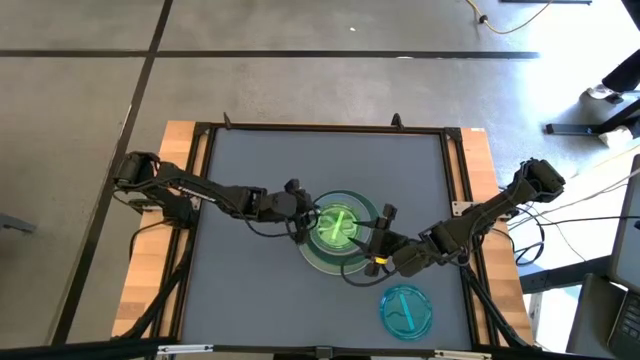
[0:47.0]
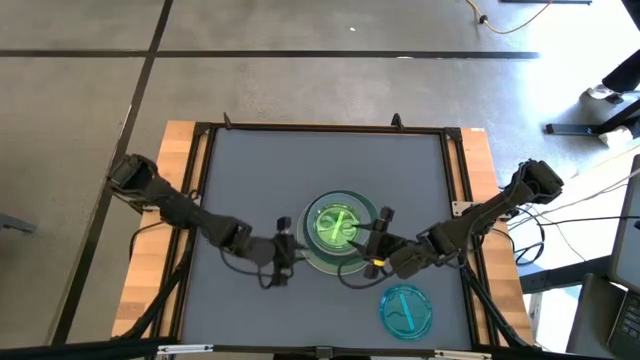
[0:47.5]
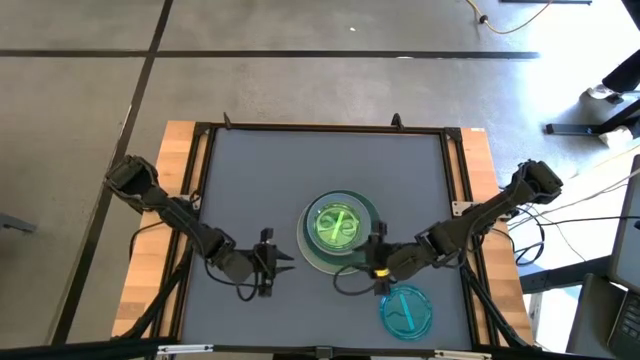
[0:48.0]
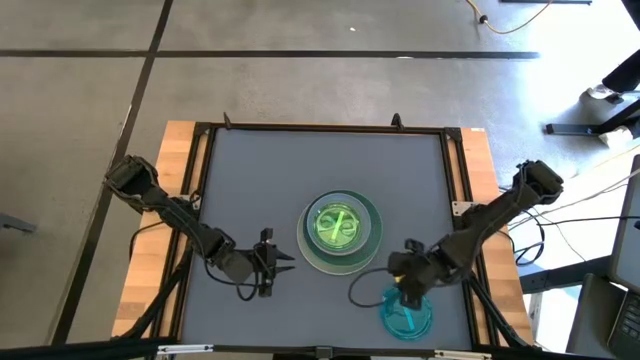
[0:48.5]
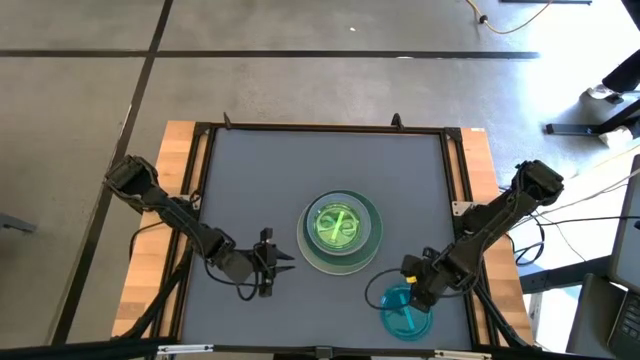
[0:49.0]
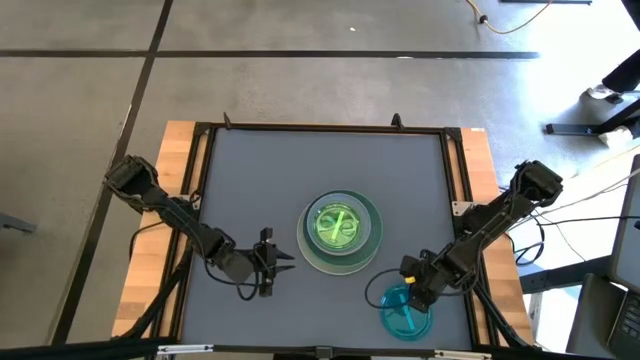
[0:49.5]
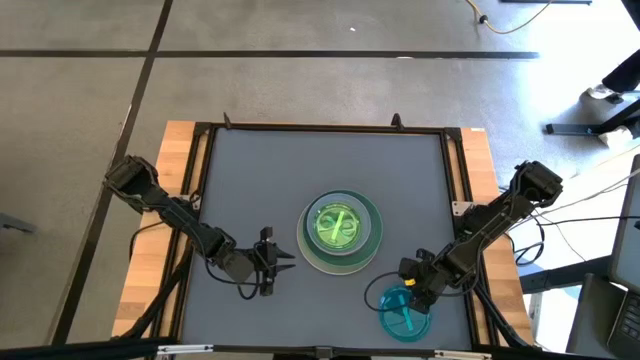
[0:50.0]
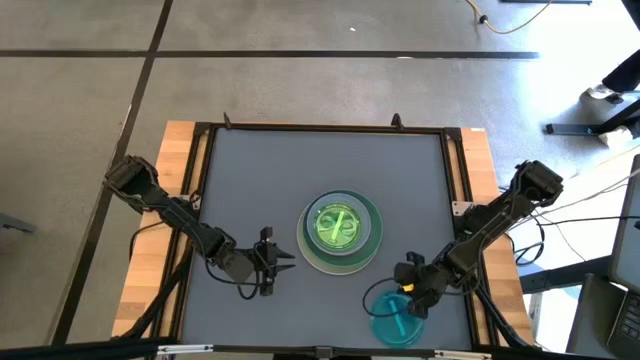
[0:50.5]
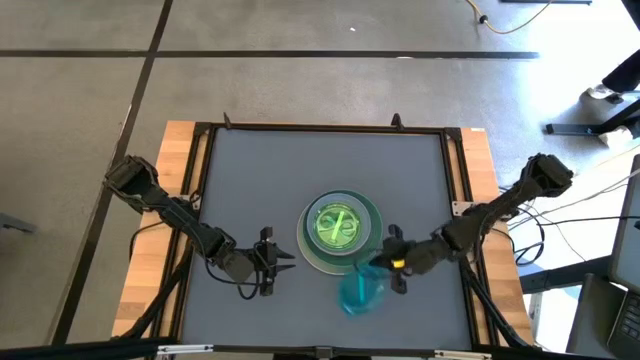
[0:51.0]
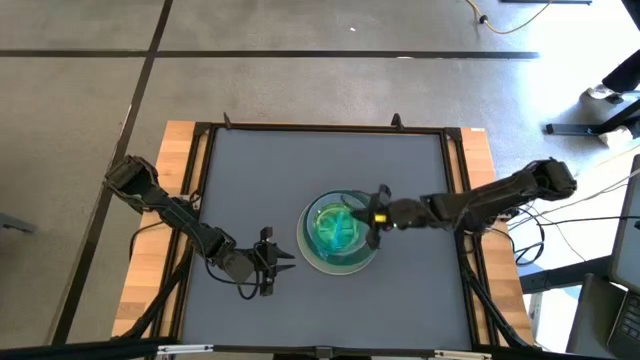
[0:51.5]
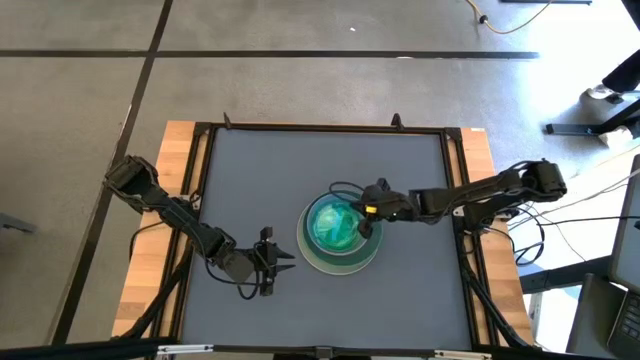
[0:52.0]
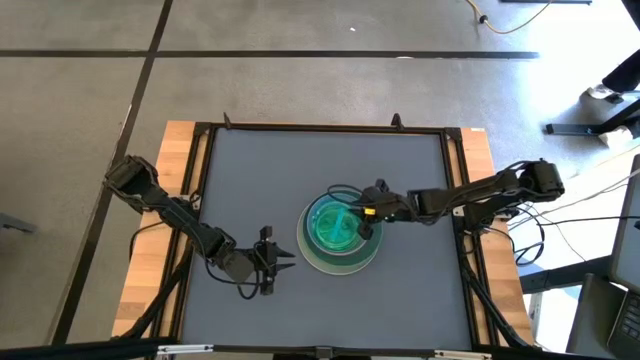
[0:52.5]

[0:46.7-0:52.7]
Task: Stack plastic plates
Stack the blue plate on the green plate

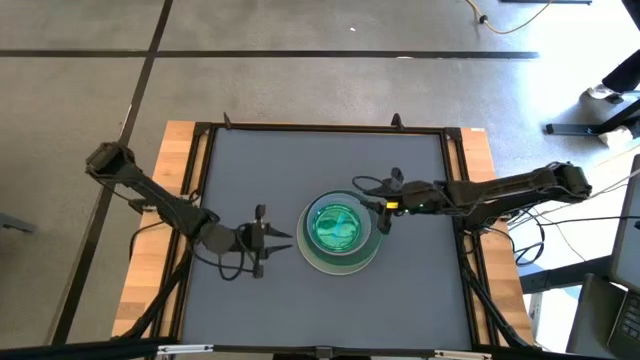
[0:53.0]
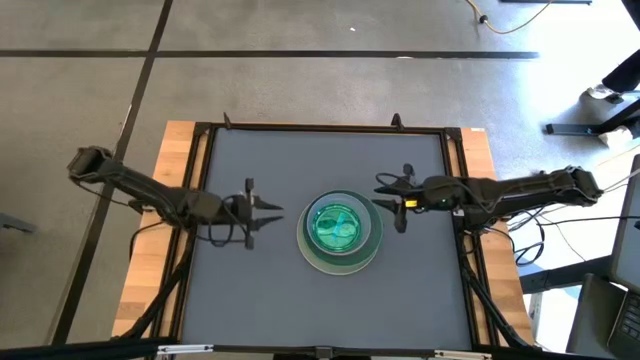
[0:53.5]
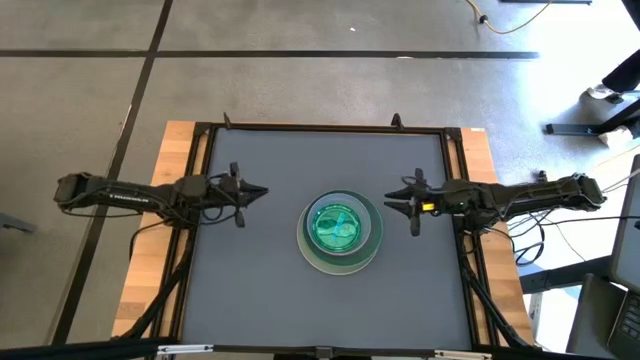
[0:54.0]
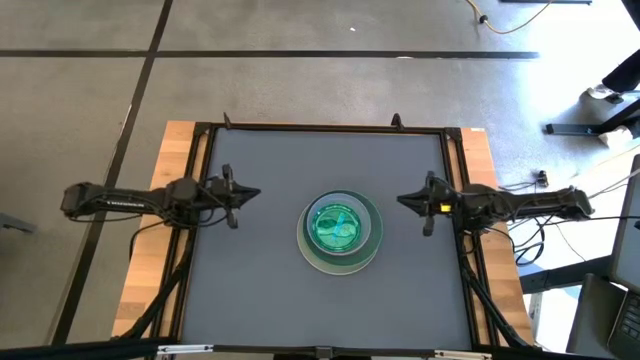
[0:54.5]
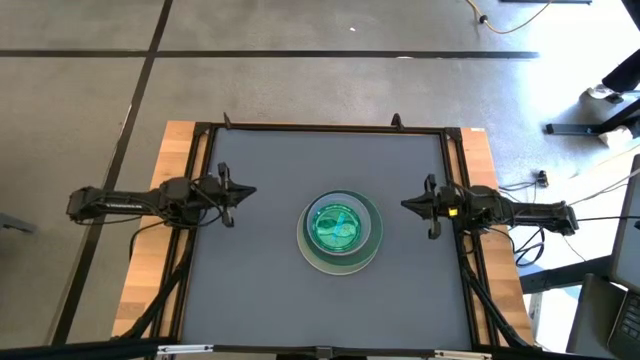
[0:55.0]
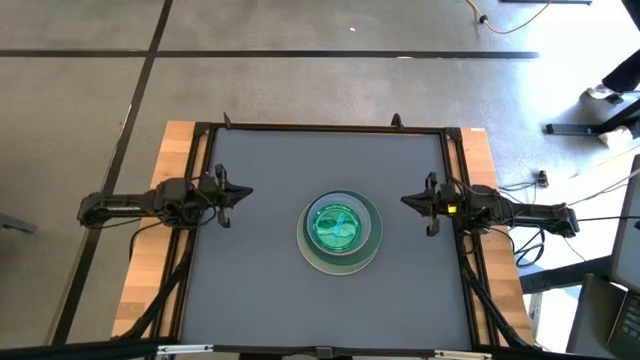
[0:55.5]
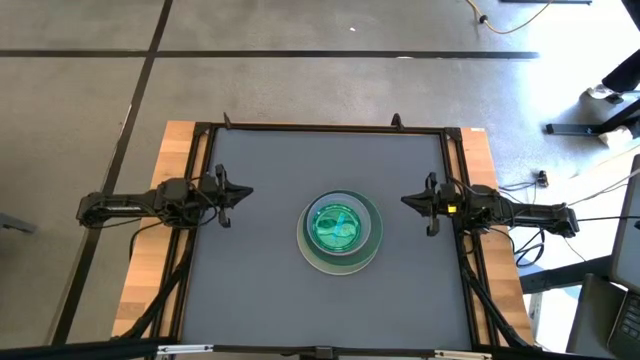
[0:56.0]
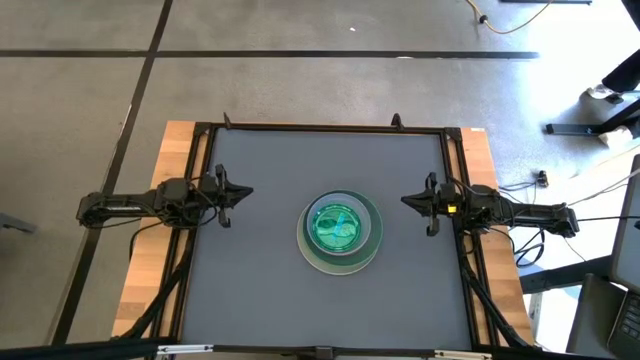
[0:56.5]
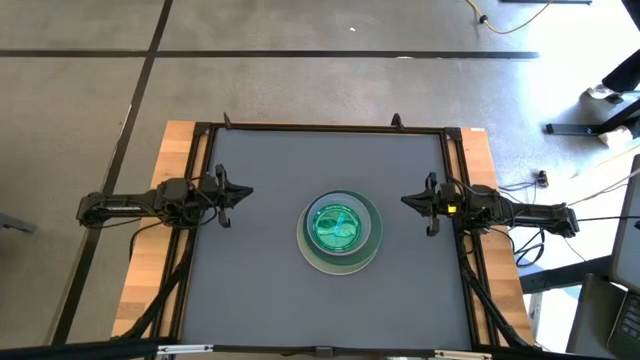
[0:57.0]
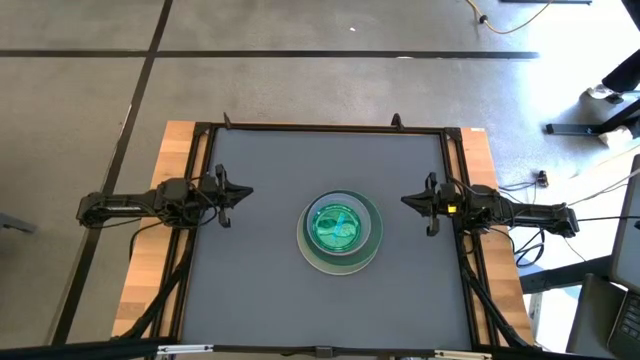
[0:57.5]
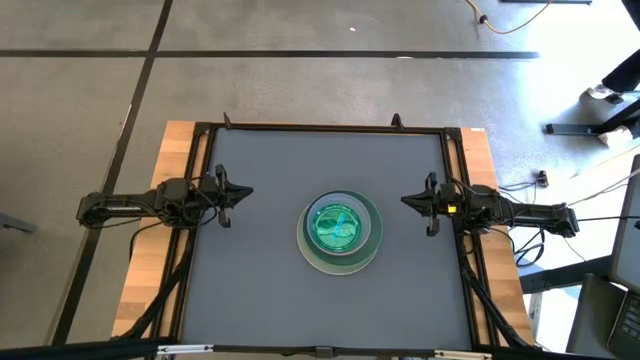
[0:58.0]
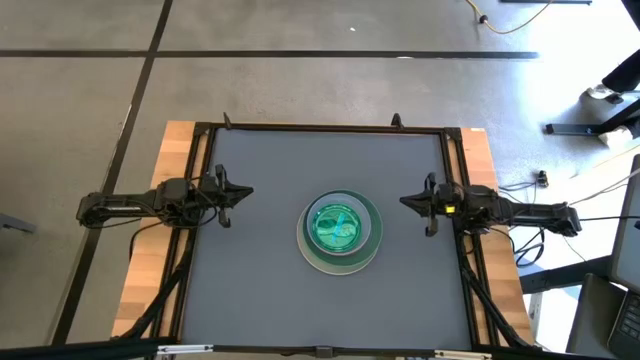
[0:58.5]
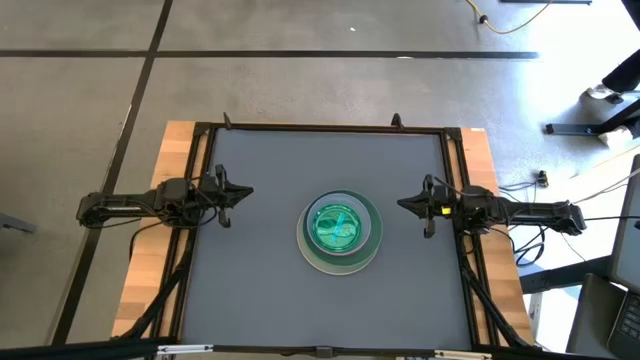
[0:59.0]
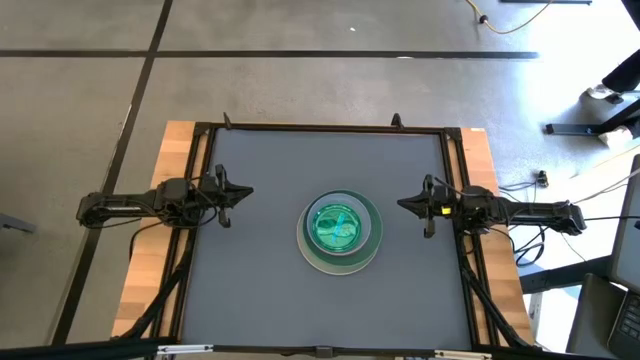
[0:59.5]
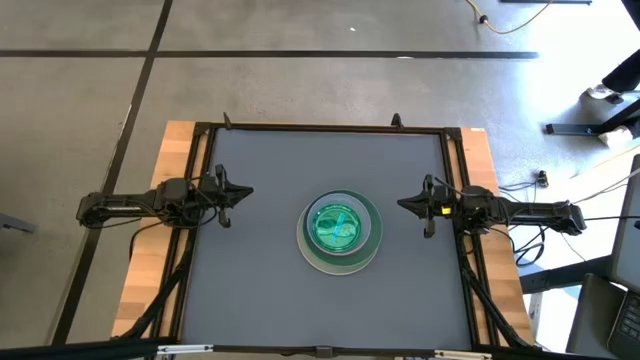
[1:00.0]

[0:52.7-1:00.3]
Return to Home Position

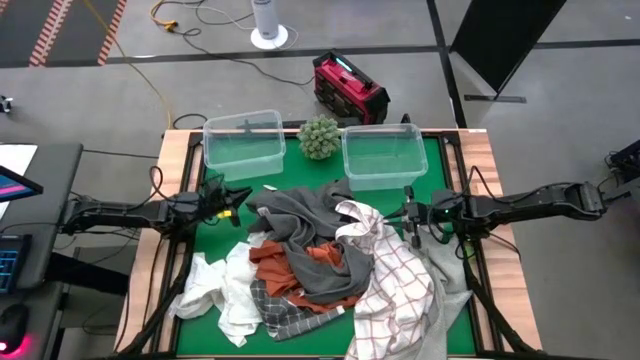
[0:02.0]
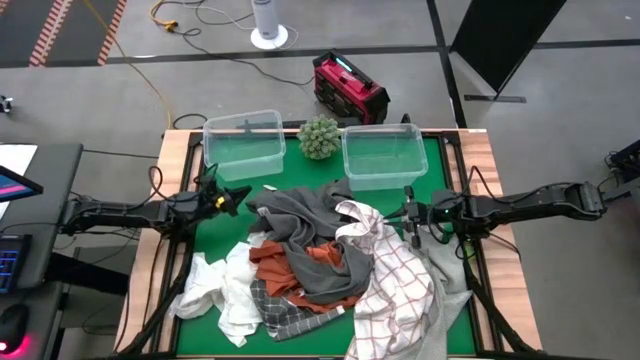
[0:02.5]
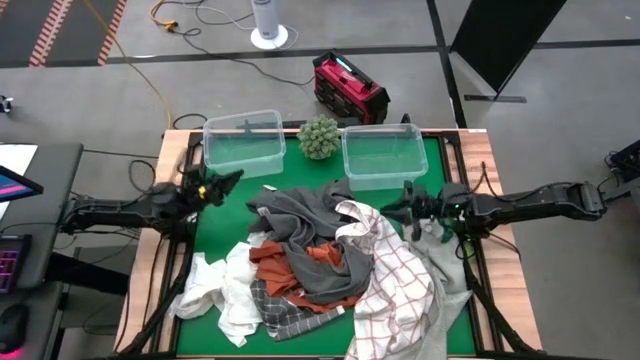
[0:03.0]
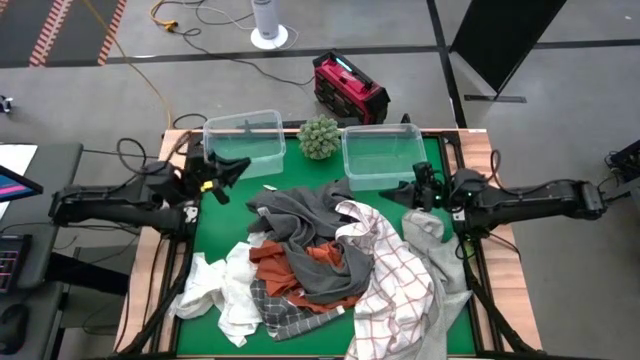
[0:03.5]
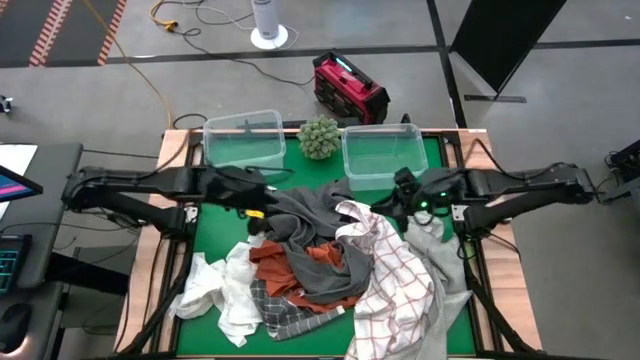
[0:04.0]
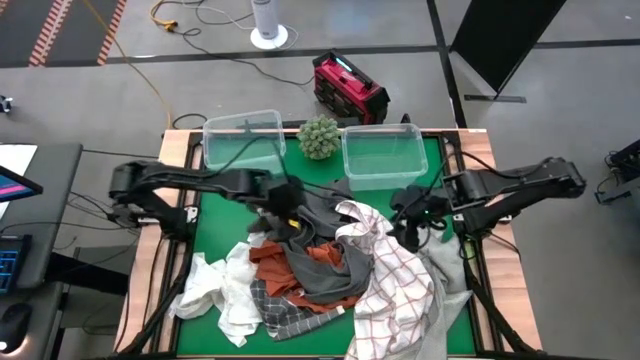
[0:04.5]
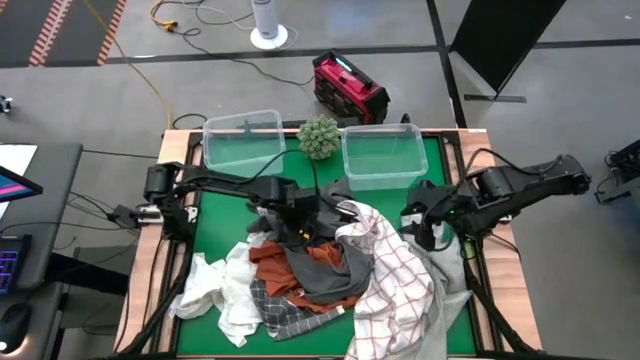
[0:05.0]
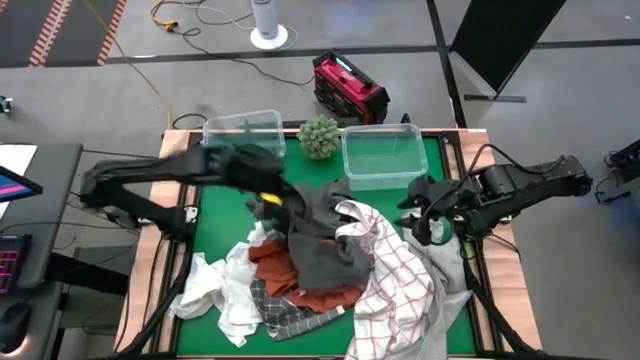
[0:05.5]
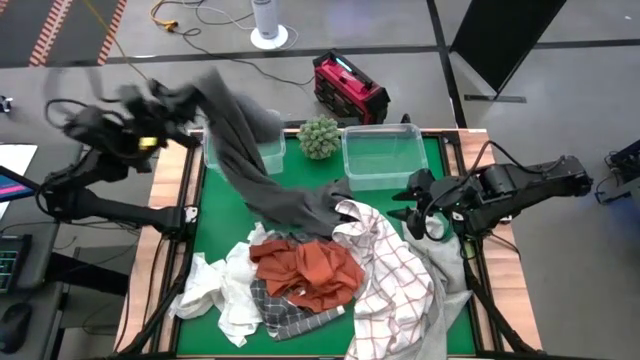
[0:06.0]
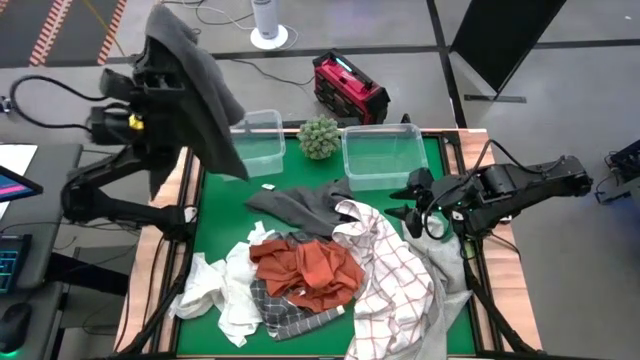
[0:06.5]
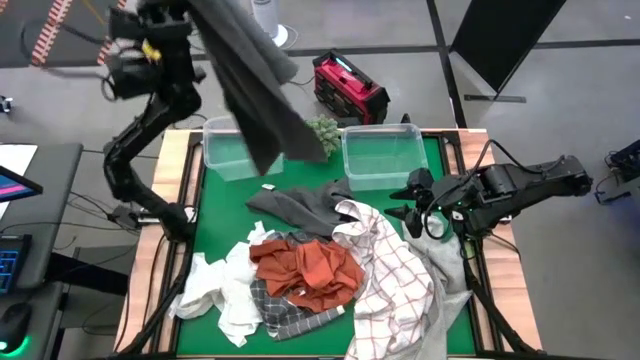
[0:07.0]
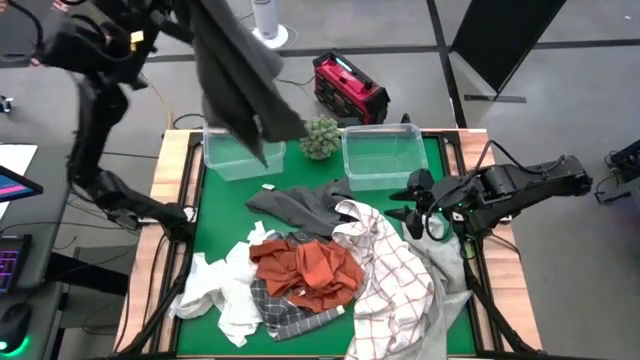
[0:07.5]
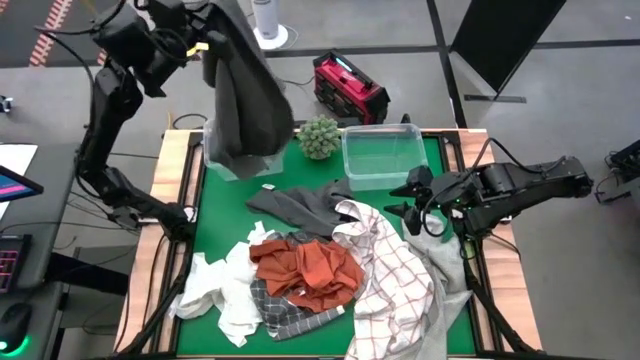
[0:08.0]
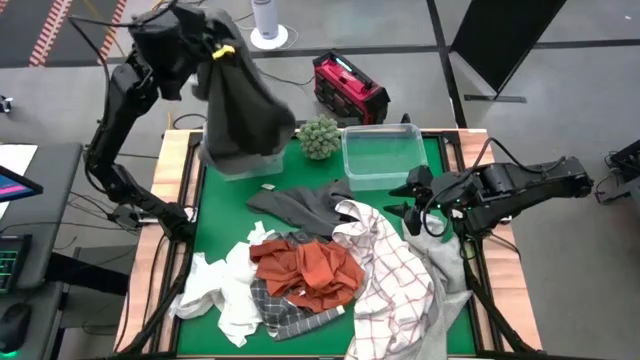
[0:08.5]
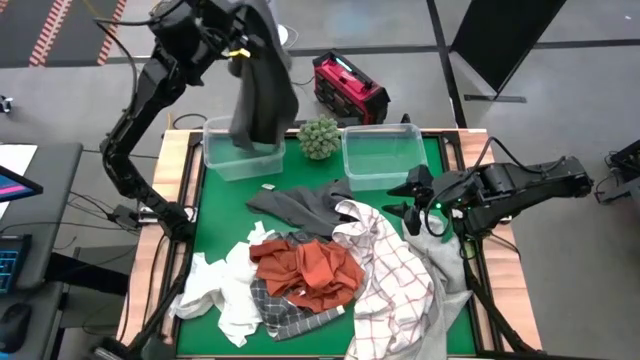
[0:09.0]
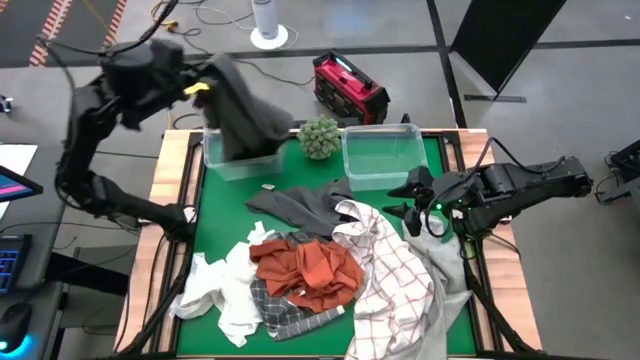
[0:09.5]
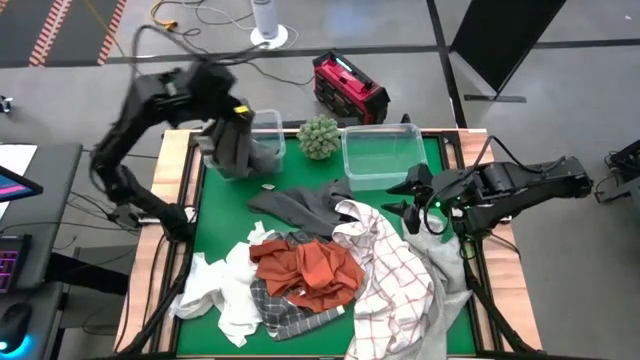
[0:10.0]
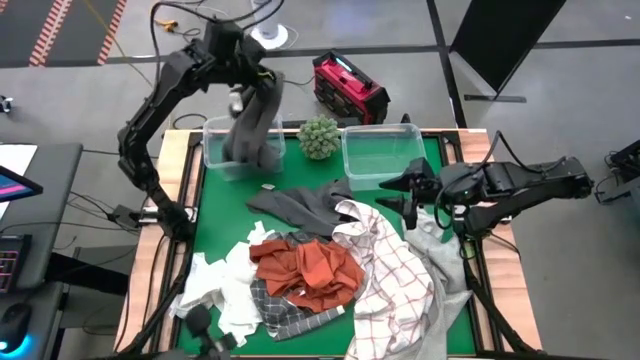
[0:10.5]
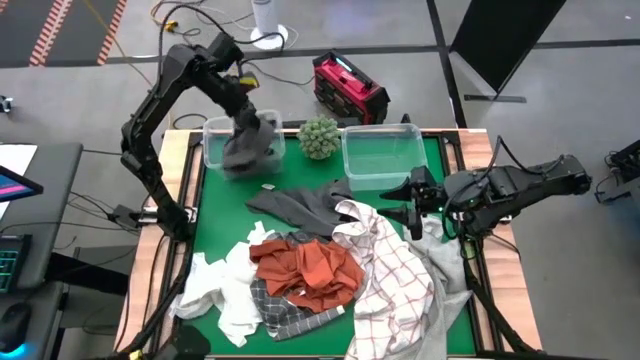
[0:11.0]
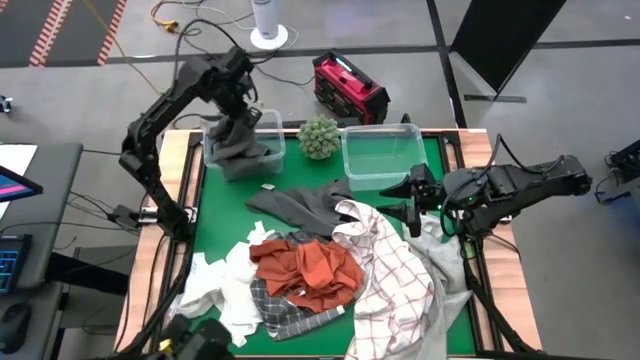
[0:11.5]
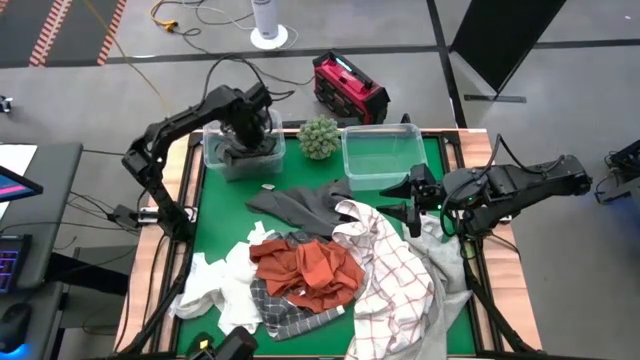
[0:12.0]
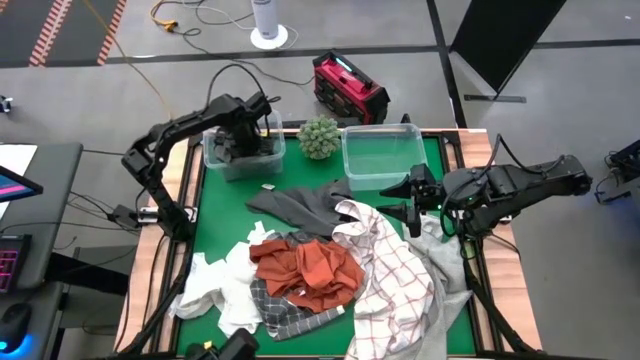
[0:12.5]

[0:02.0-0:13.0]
Task: Sort towels by color in basket
Put the dark gray towel into the left transparent bin
